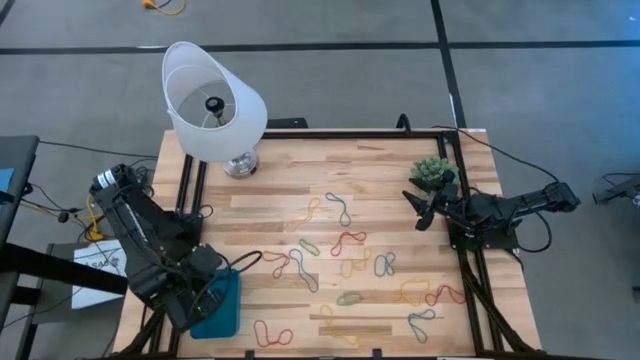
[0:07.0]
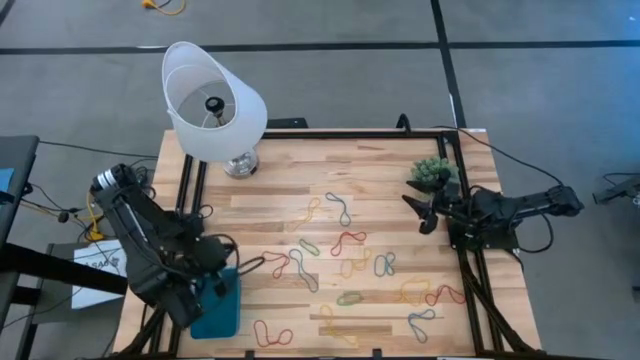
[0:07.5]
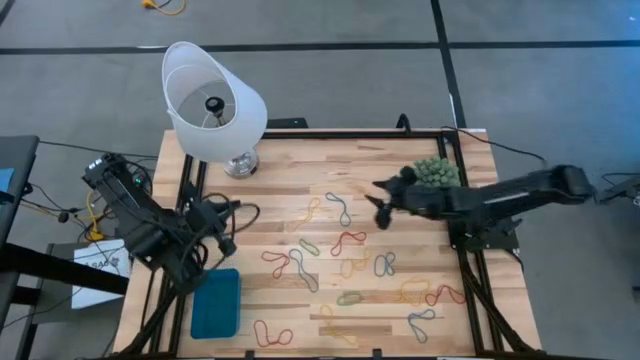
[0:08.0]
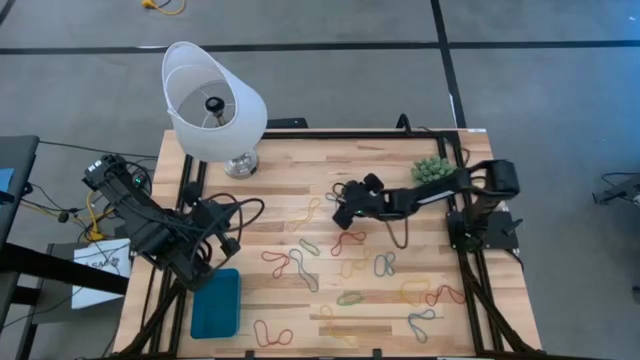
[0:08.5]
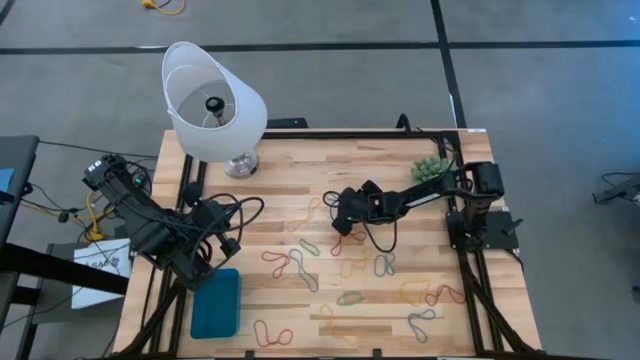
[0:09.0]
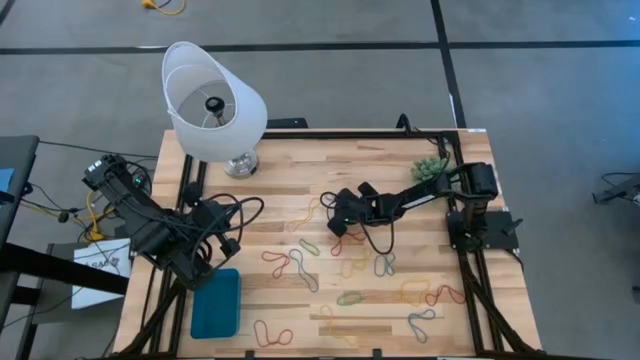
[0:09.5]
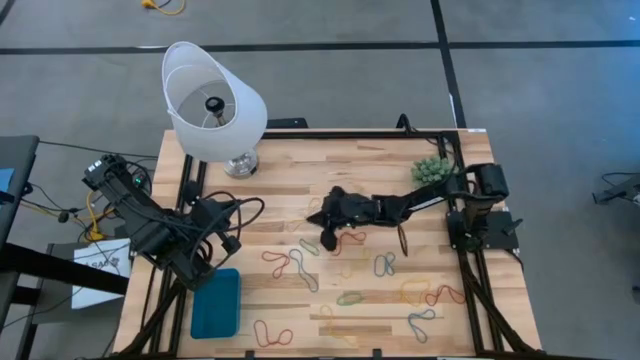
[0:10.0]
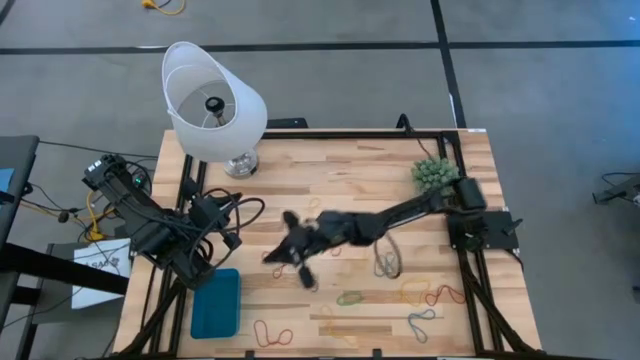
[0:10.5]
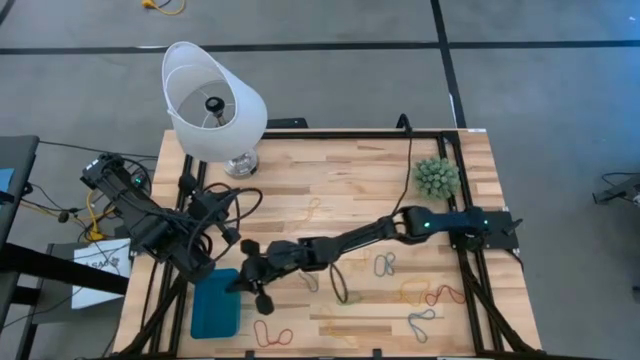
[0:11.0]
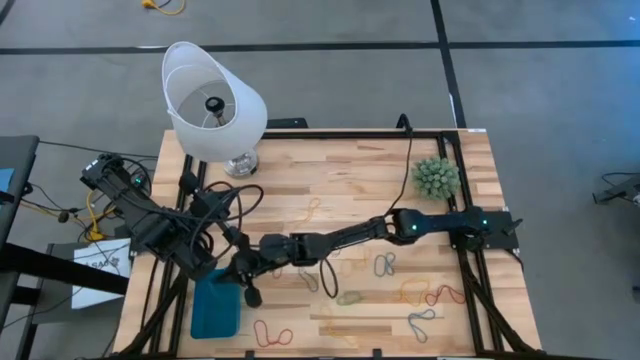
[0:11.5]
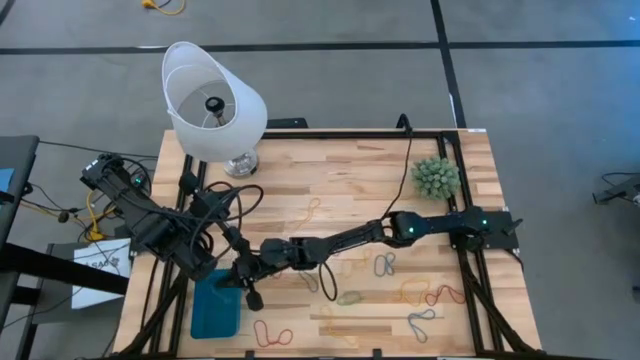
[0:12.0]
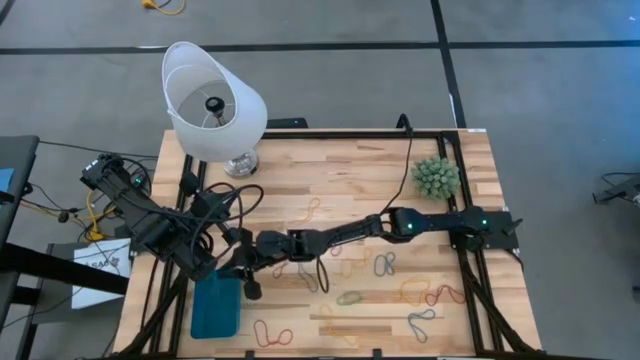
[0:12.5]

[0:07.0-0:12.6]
Task: Pick and place items into bin
Put the blue rubber band into the blue bin

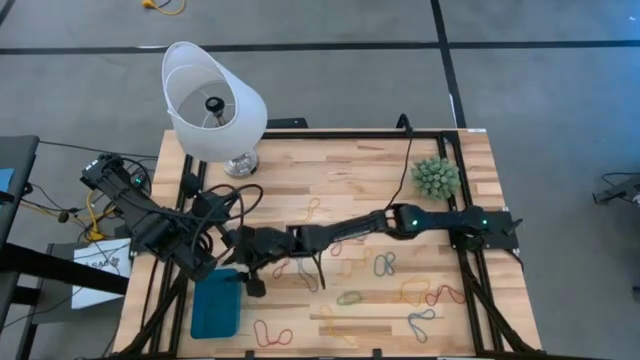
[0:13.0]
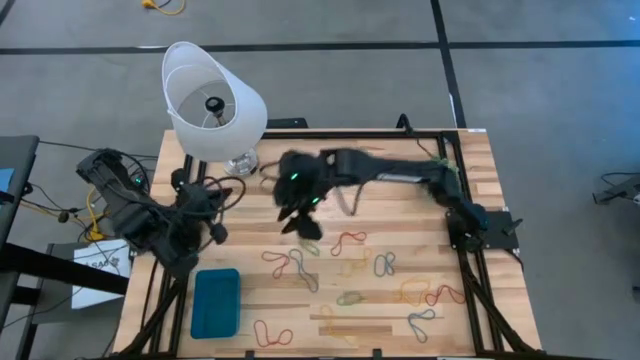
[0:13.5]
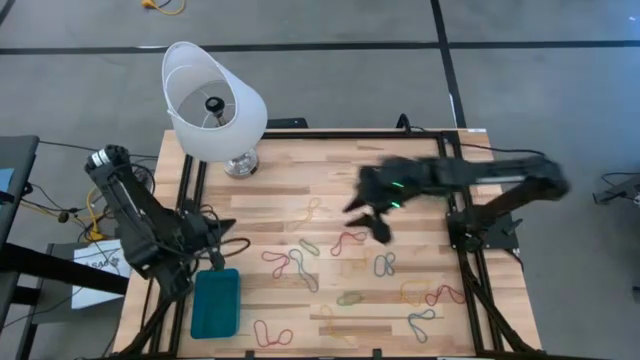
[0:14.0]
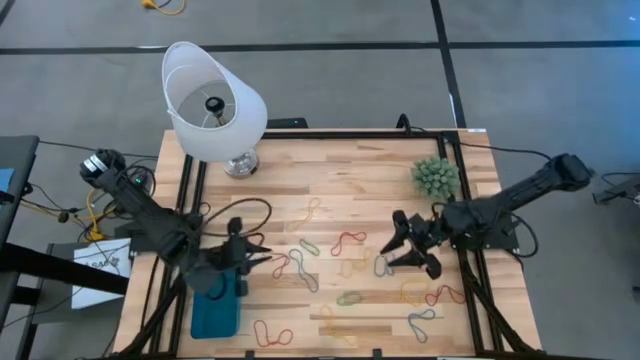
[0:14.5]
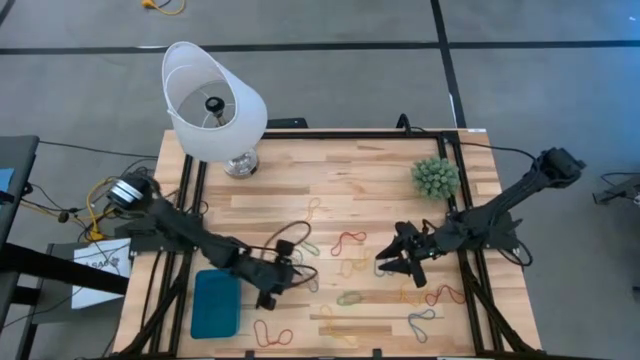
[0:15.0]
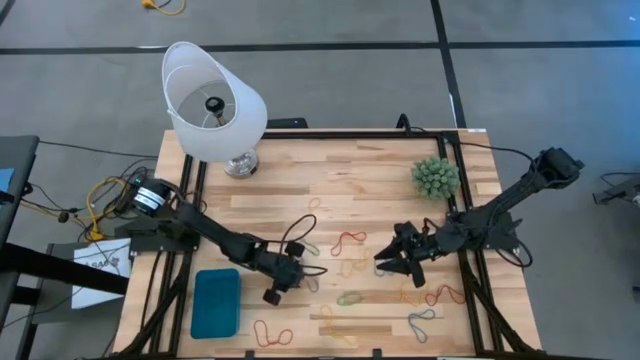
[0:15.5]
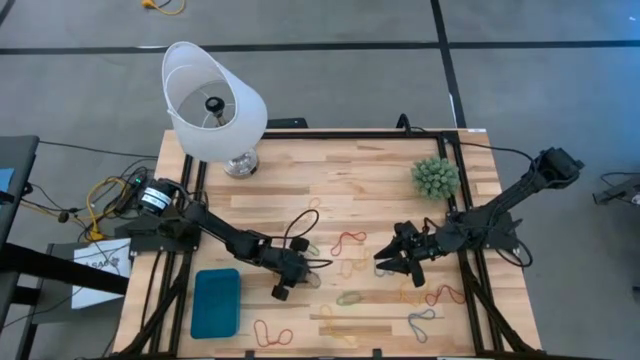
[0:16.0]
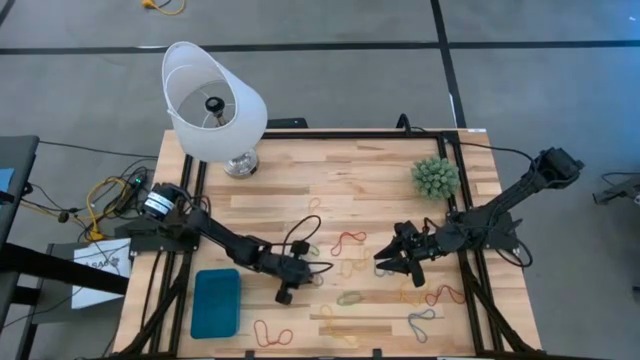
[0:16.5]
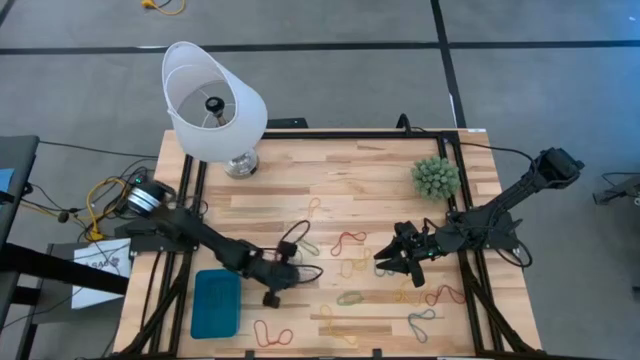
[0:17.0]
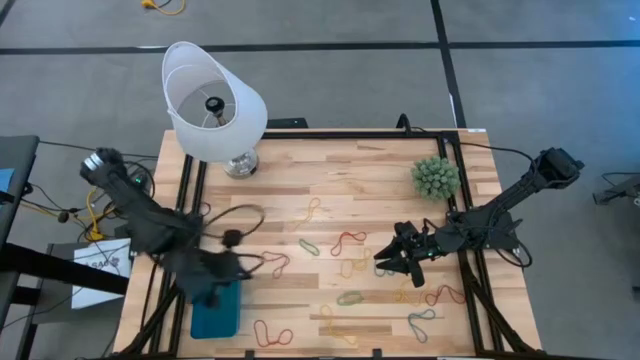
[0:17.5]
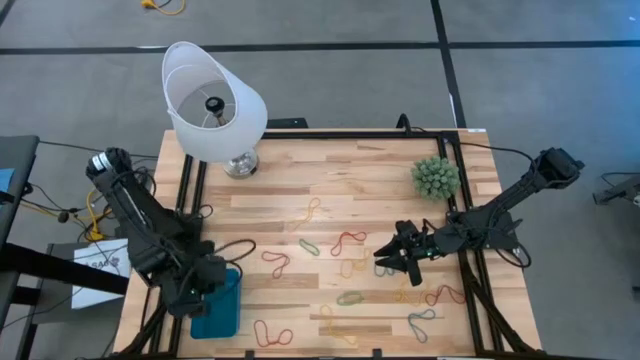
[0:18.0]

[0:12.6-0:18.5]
Put the blue rubber band into the blue bin

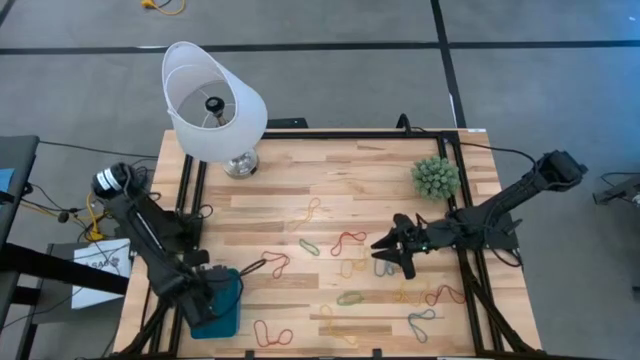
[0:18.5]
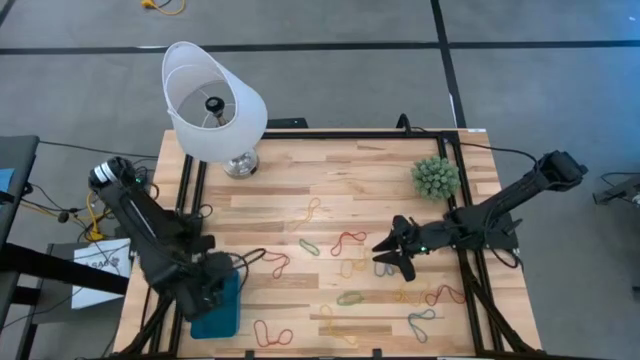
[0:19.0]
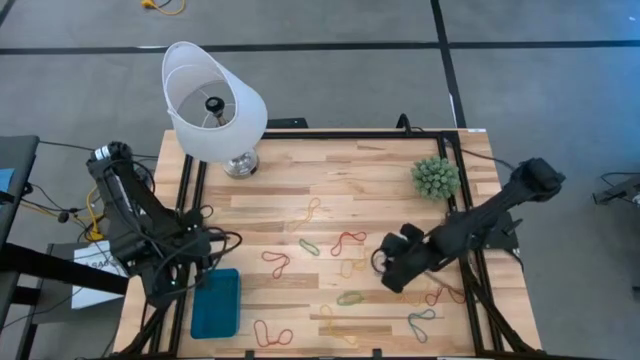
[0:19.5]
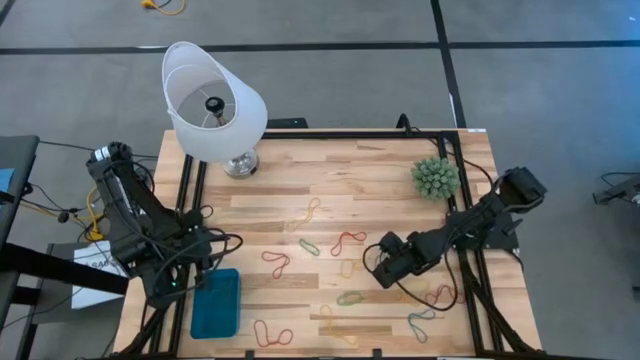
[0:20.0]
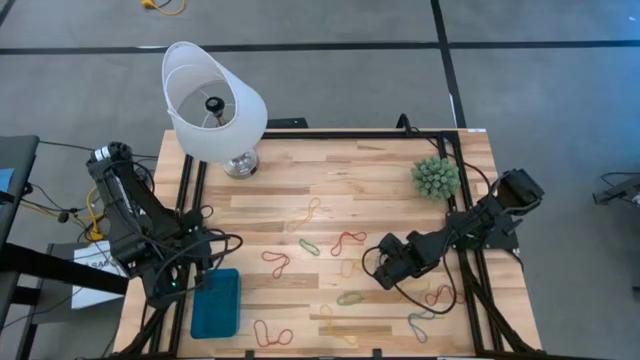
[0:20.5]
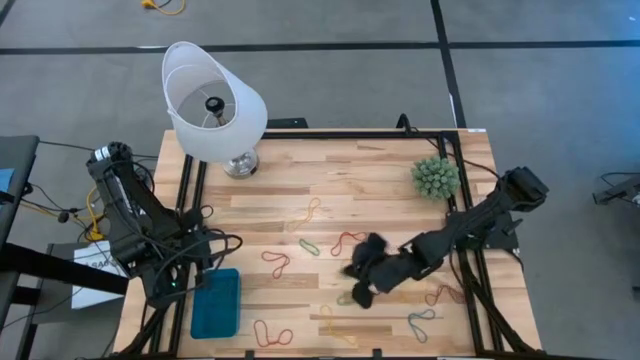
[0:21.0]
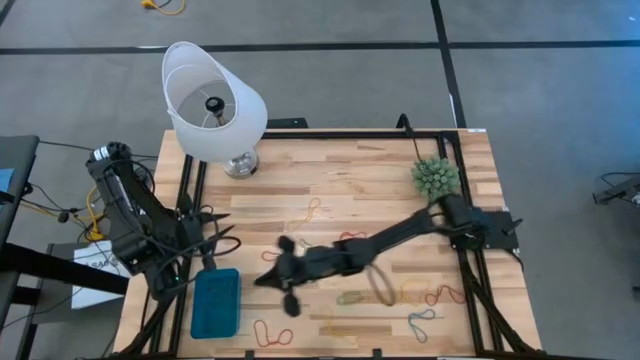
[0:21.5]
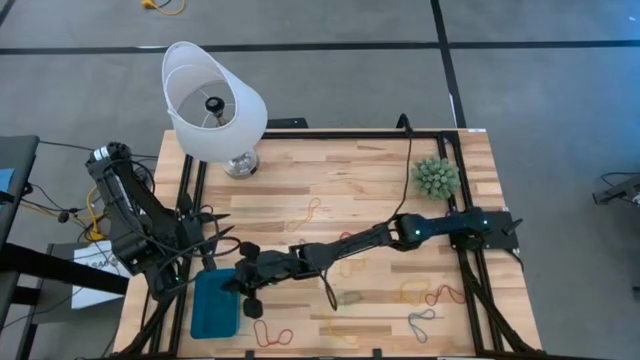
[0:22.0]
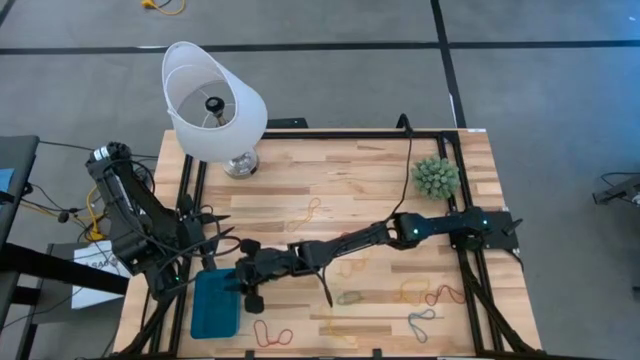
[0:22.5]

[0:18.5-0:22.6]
Put the blue rubber band into the blue bin

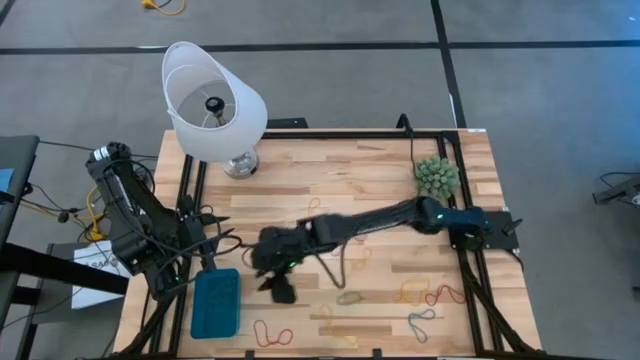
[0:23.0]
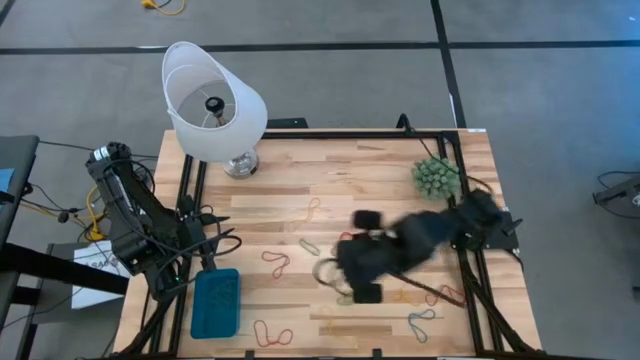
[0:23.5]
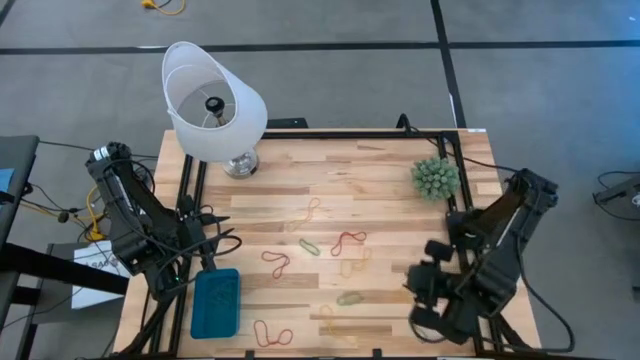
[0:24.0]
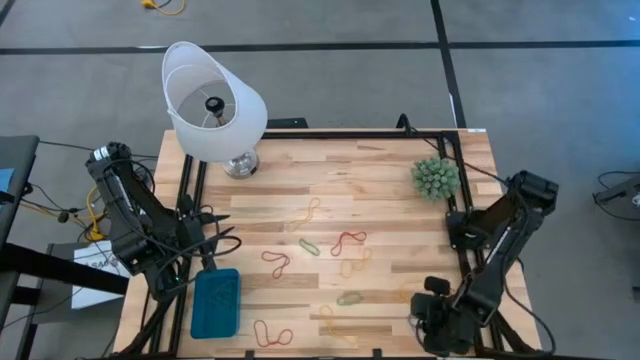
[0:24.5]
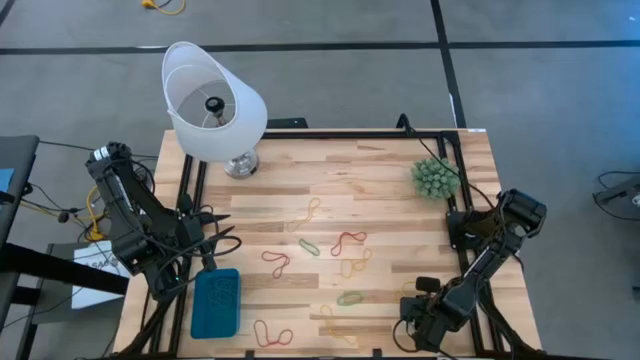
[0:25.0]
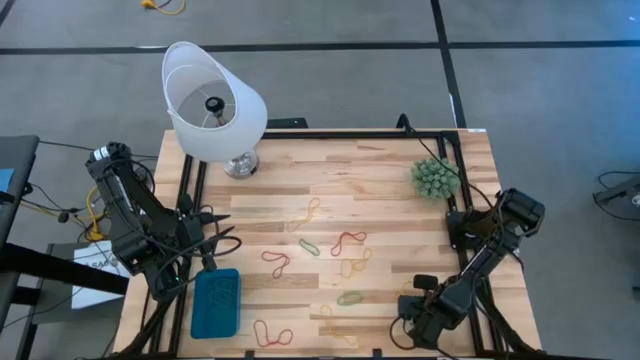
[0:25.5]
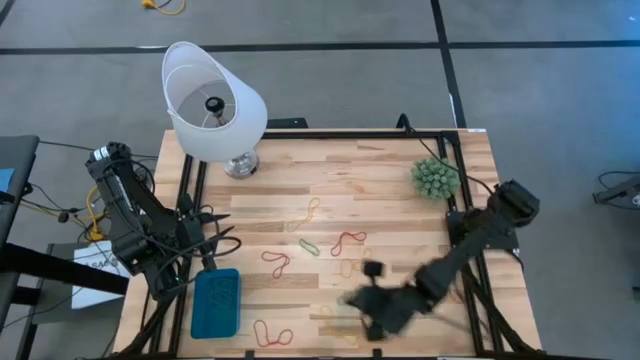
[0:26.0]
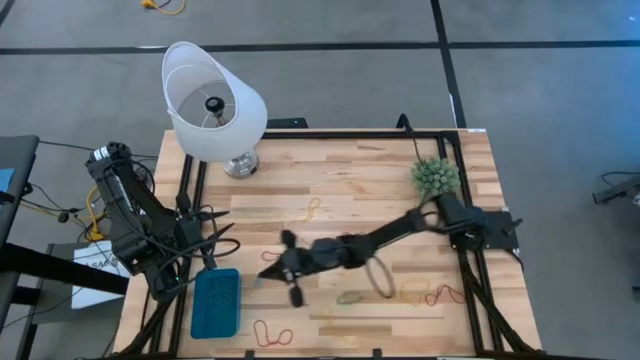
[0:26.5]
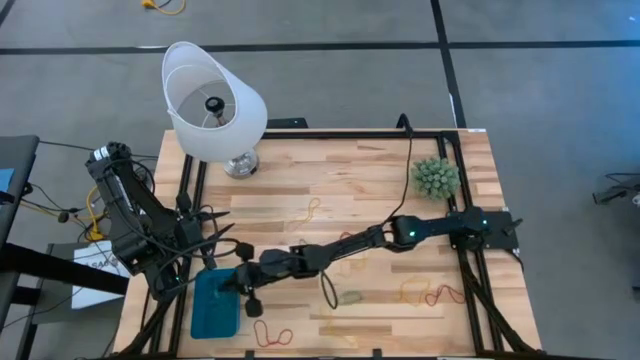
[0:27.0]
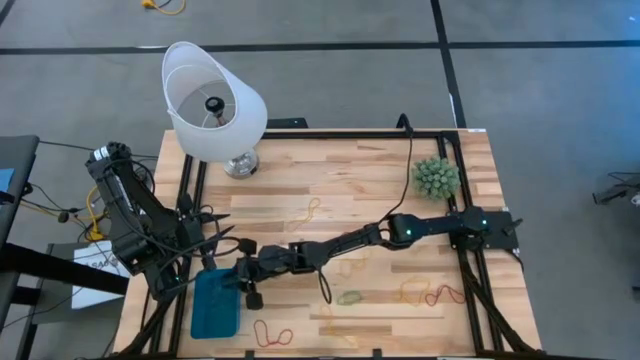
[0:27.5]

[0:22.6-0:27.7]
Put the blue rubber band into the blue bin
